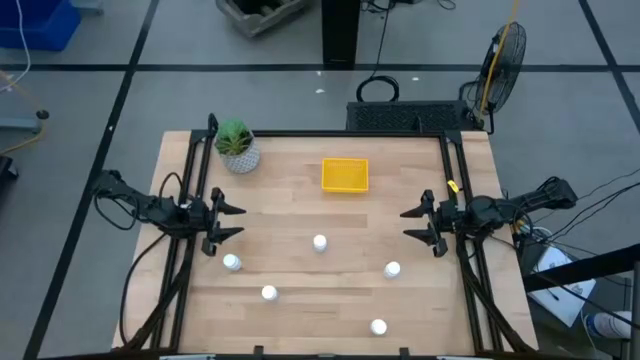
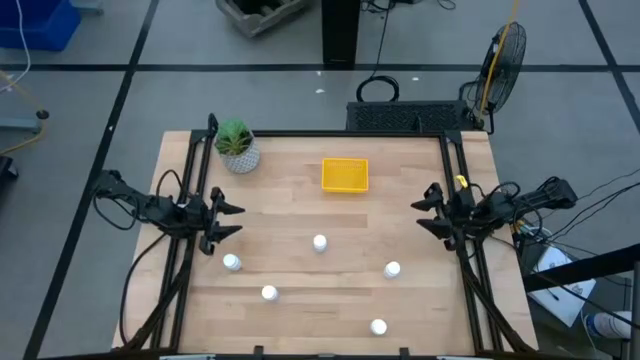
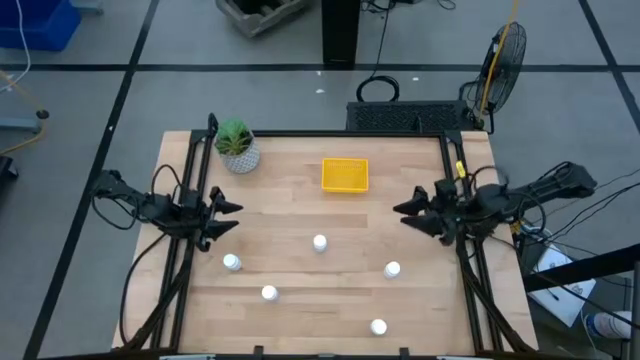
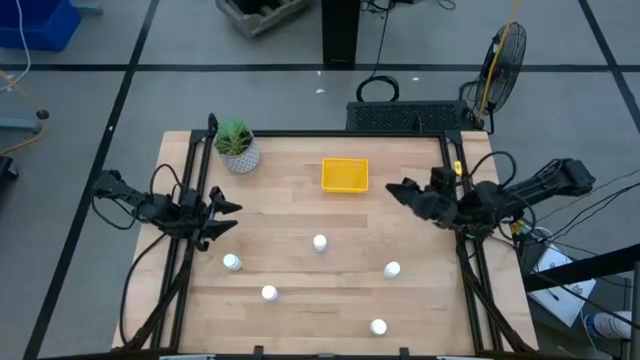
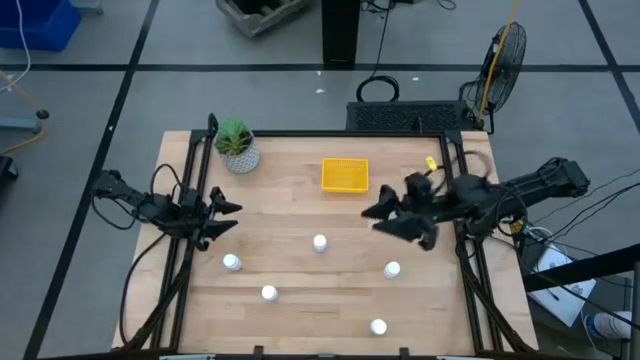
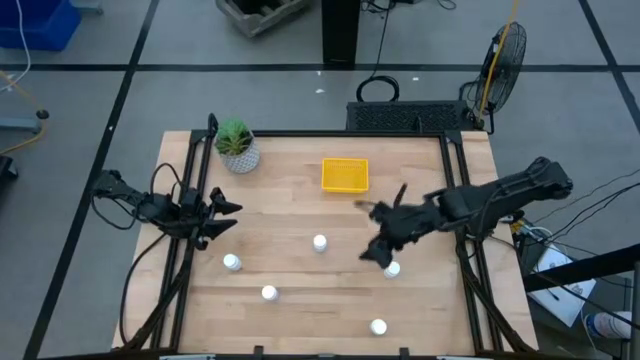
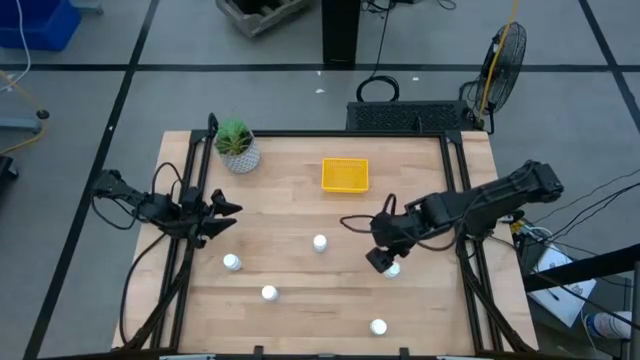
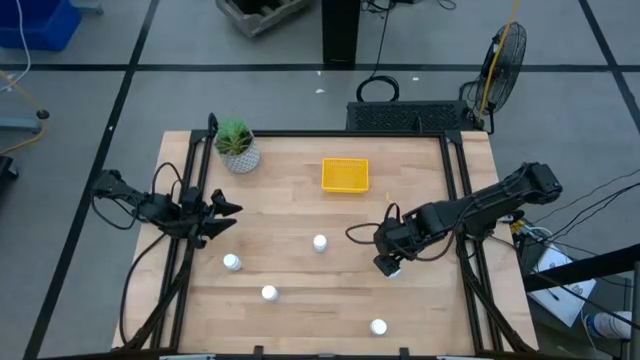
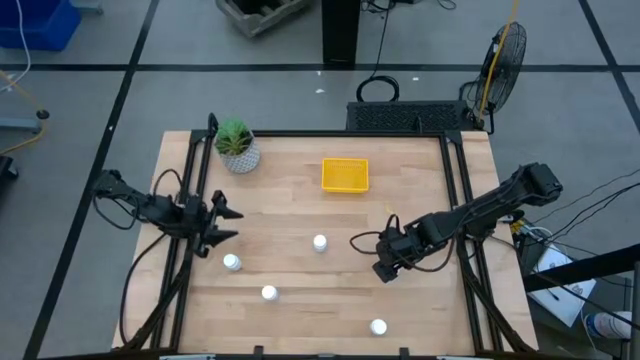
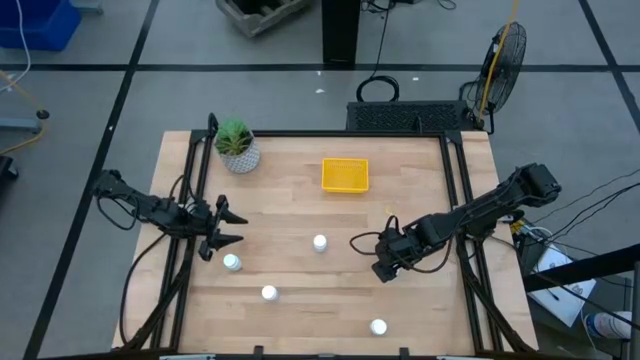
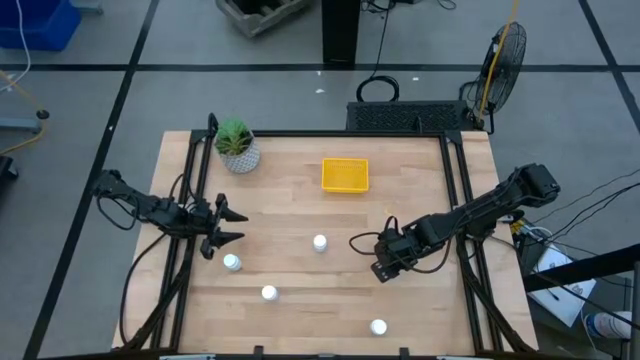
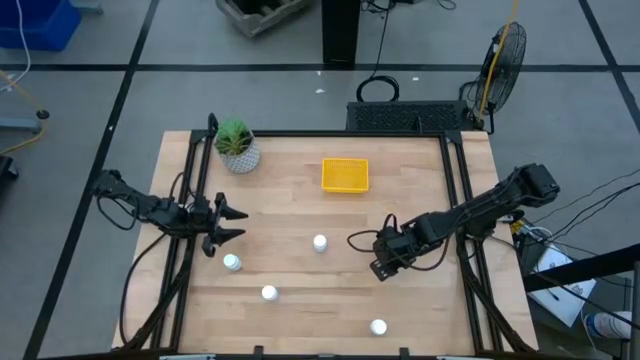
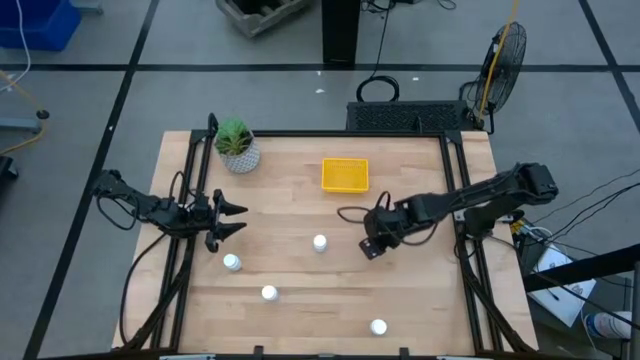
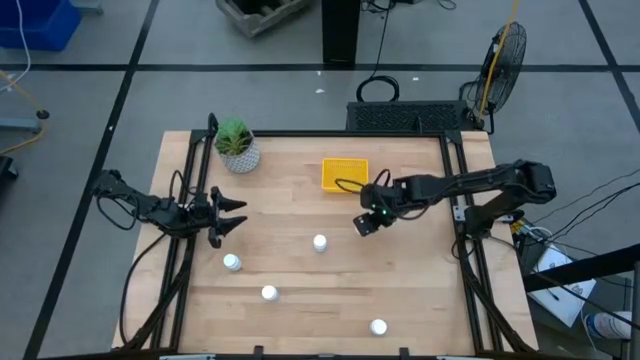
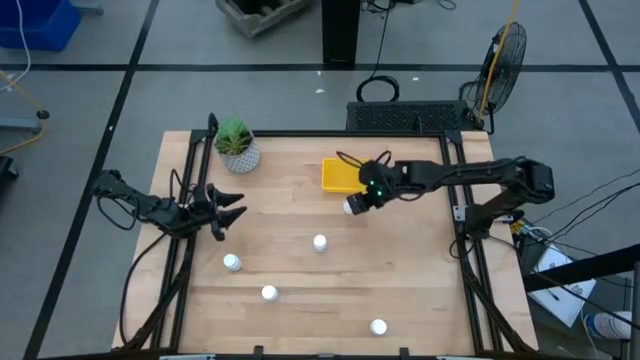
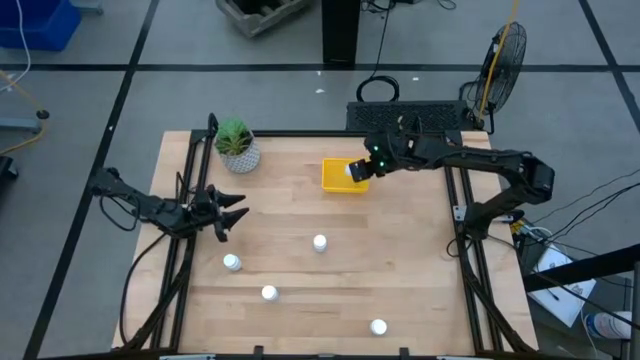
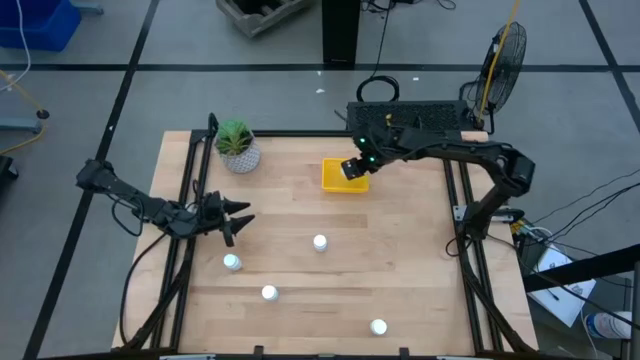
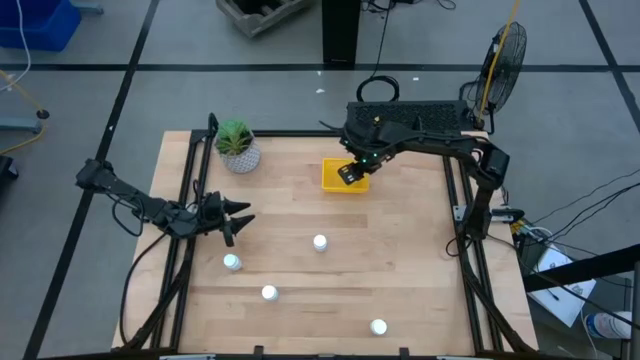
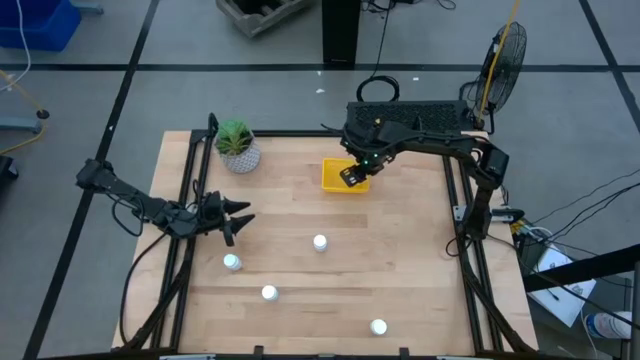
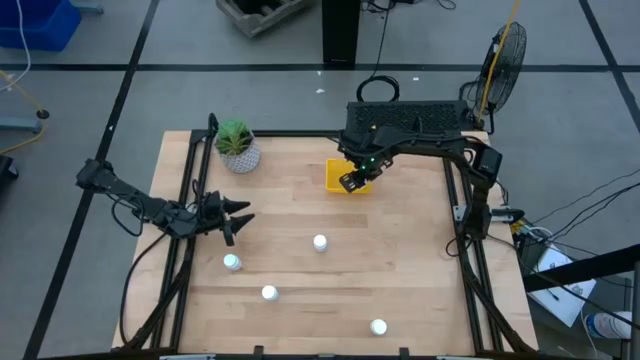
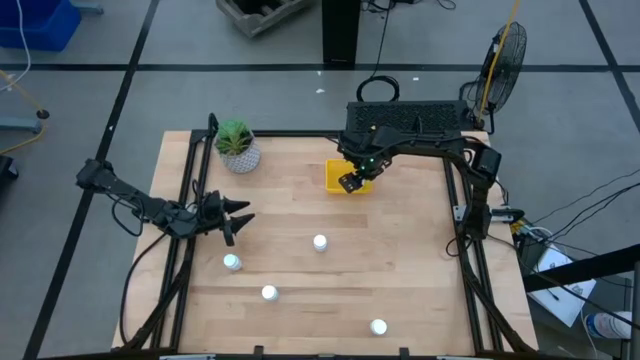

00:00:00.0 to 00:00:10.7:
Task: Pick and place pill bottles into a basket
Put the white pill bottle into the yellow bin

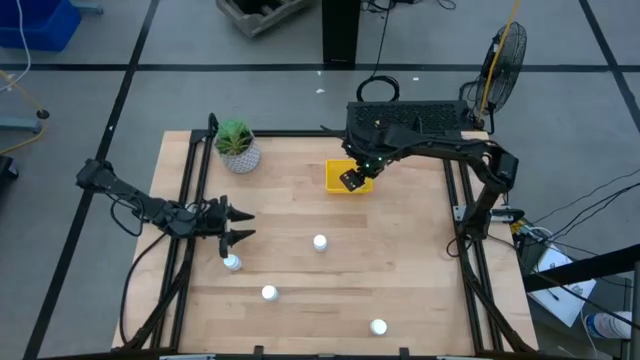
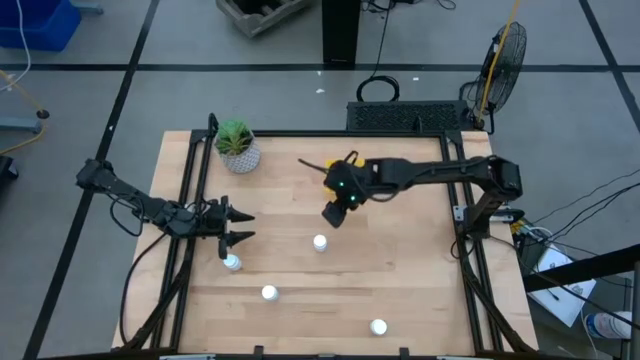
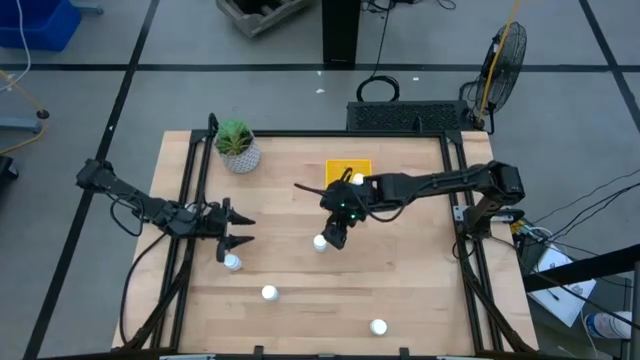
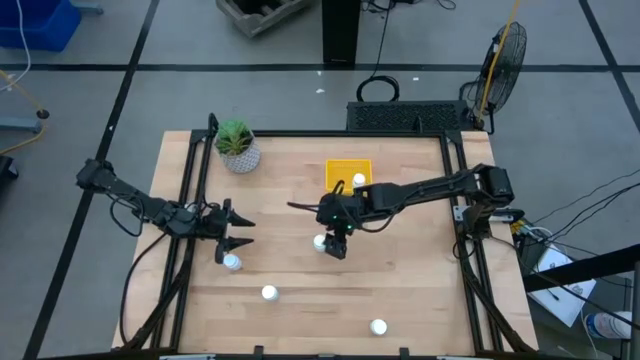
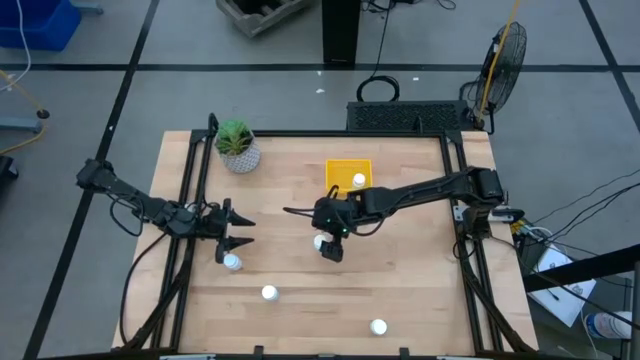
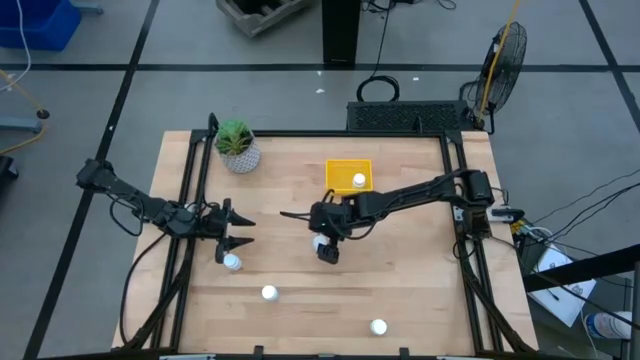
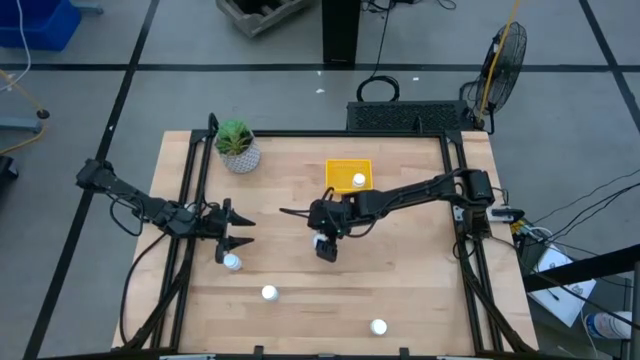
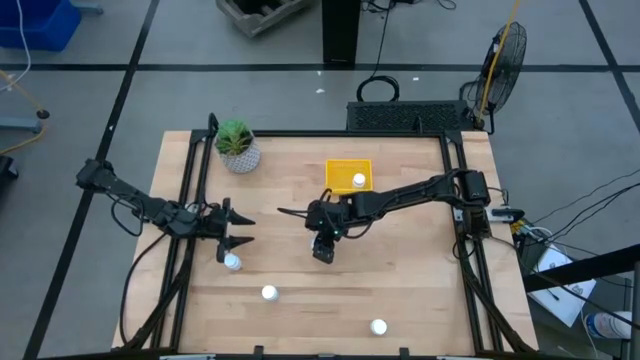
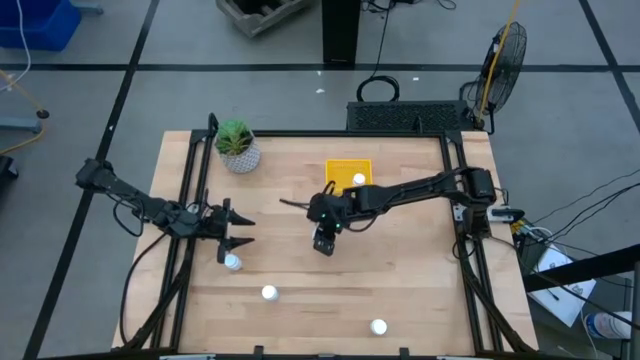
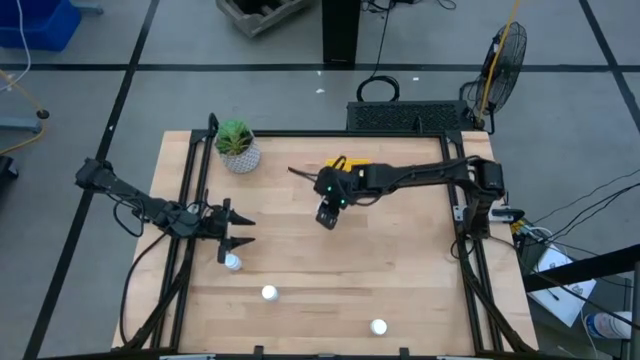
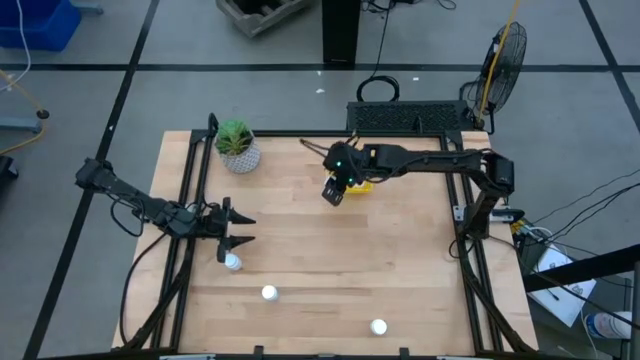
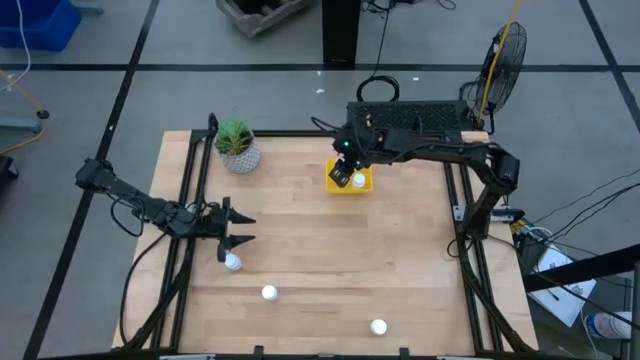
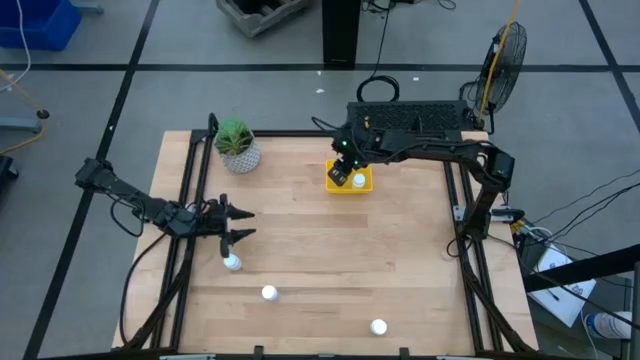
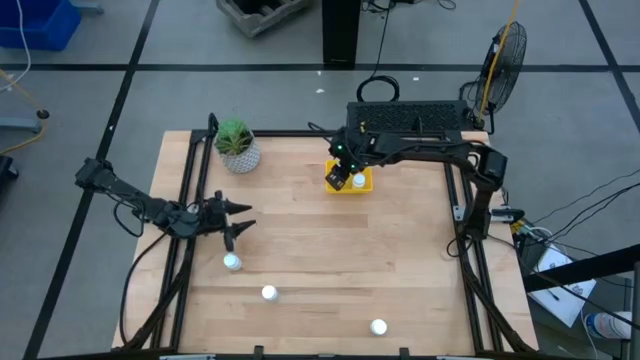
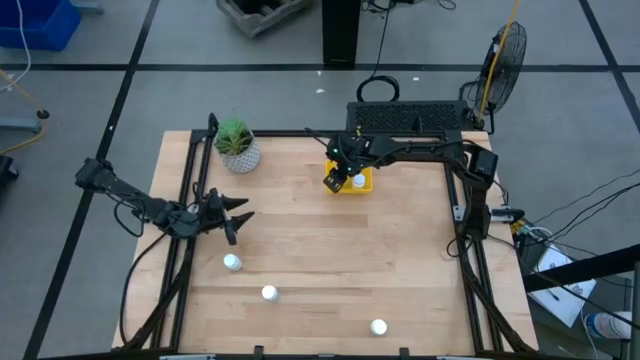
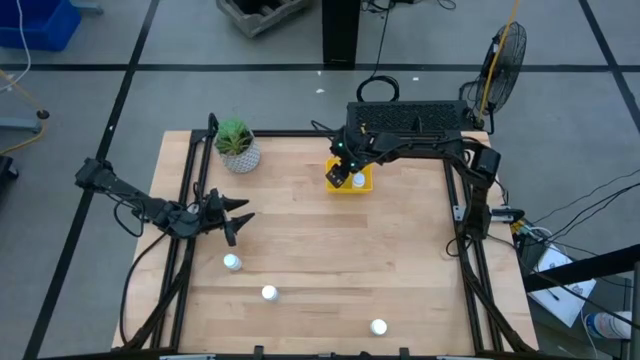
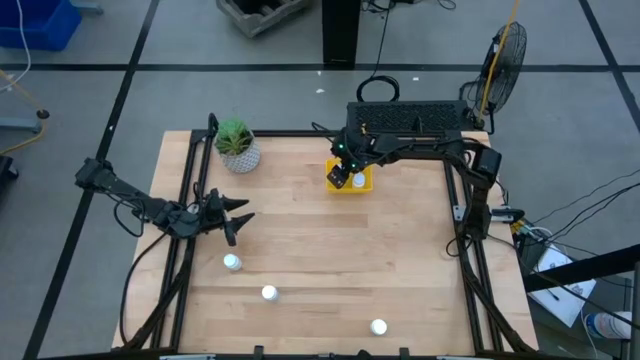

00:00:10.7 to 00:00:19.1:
Put the white pill bottle into the yellow bin

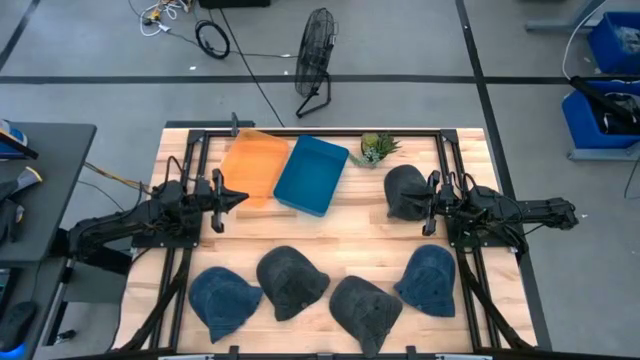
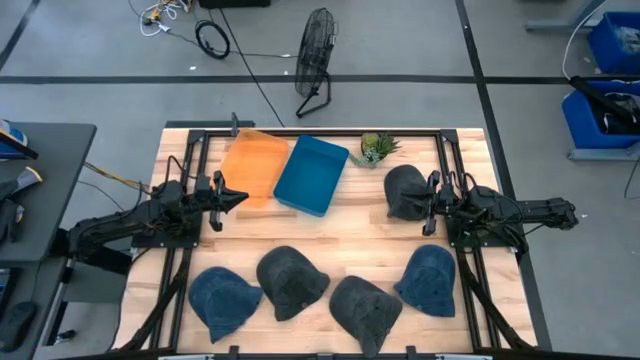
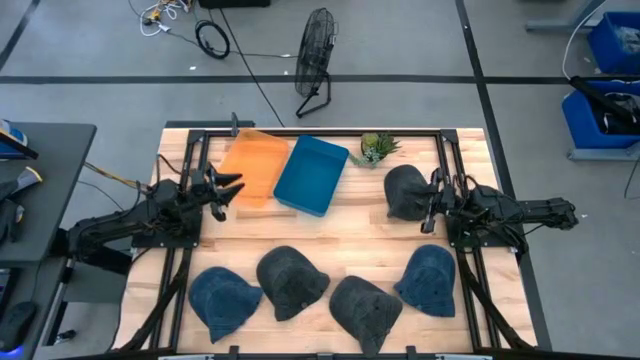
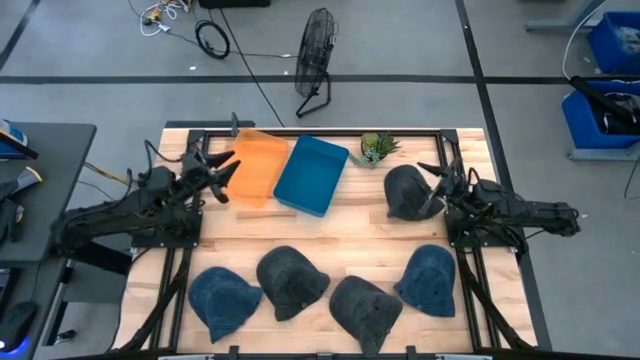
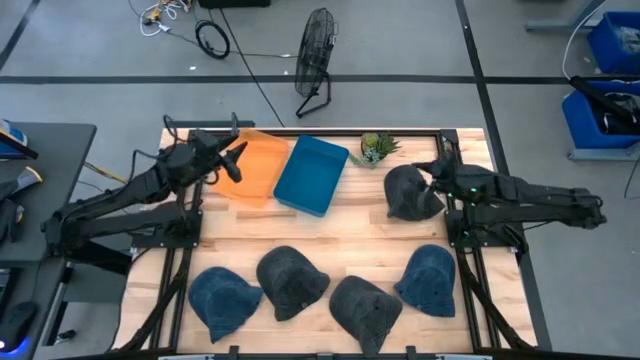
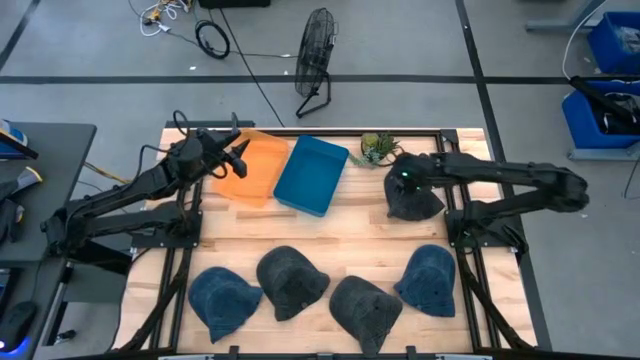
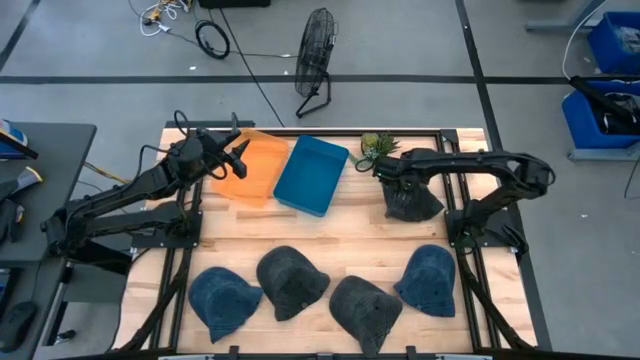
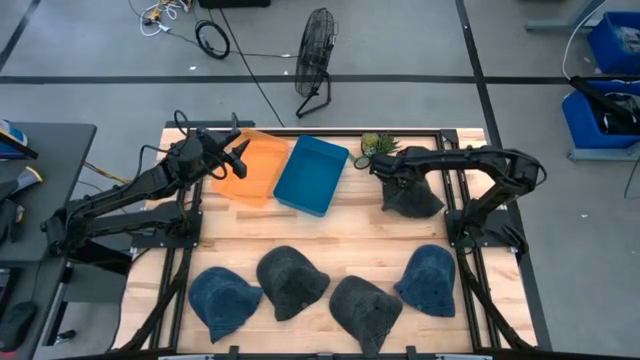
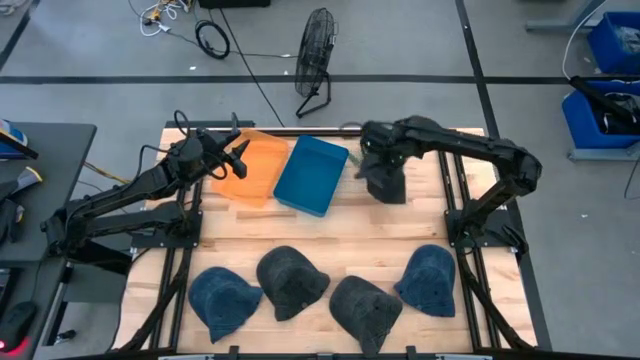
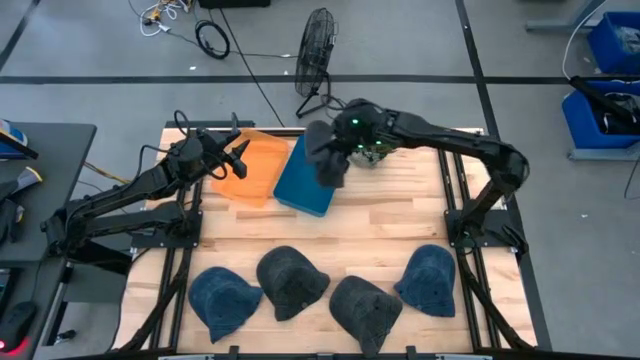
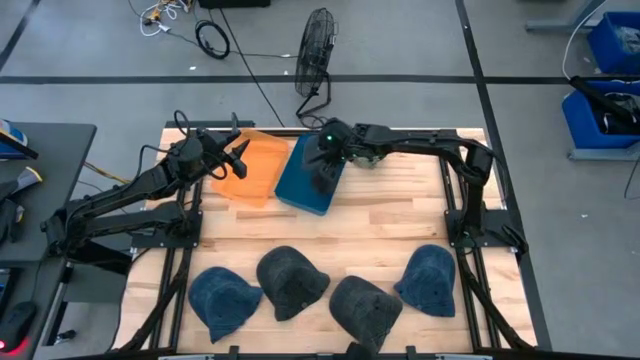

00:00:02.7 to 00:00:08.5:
Task: Pick & Place hat
Put the top black cap into the blue bin
